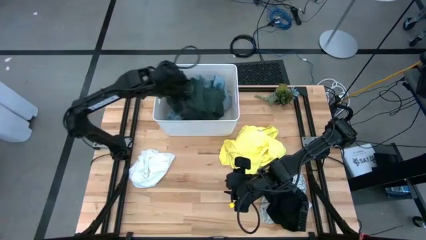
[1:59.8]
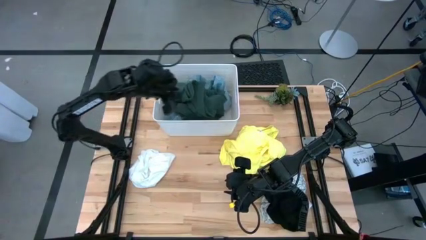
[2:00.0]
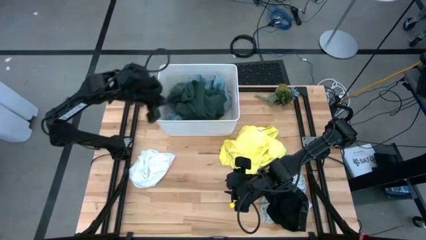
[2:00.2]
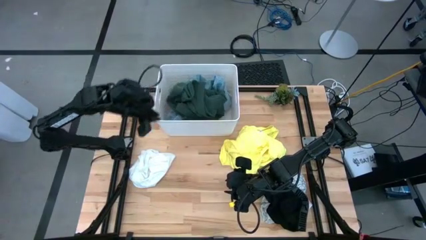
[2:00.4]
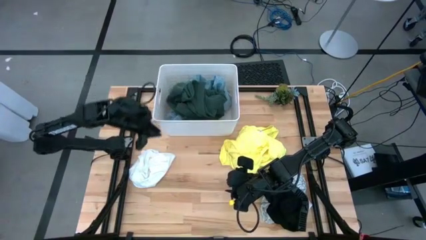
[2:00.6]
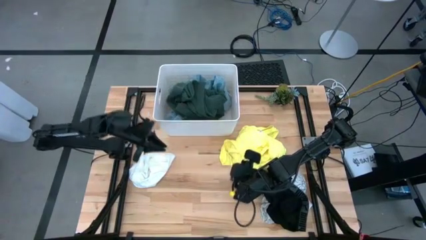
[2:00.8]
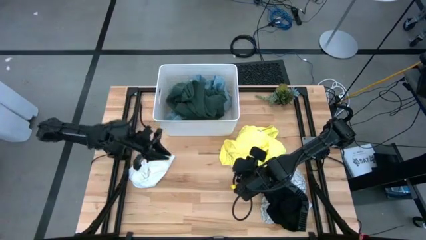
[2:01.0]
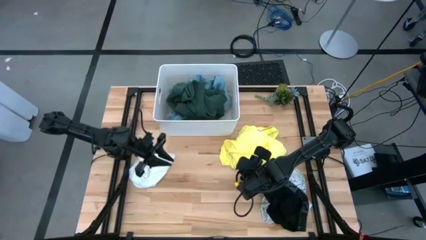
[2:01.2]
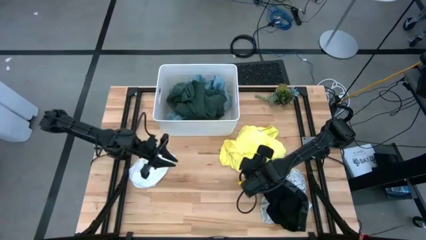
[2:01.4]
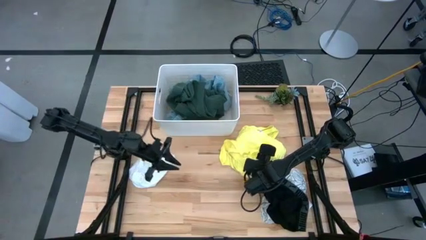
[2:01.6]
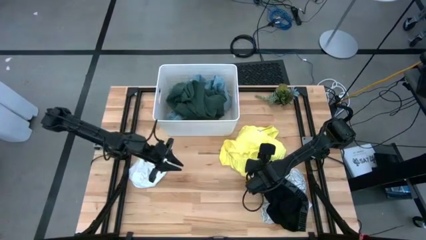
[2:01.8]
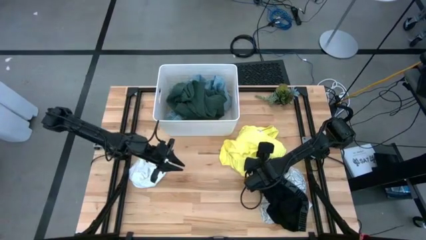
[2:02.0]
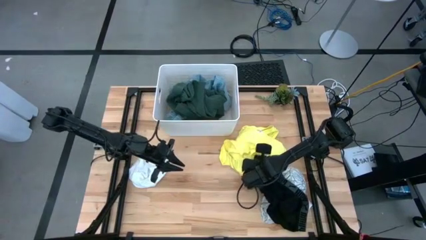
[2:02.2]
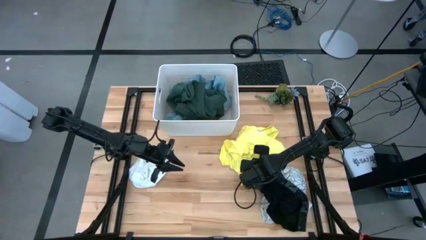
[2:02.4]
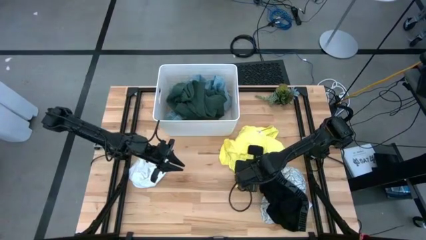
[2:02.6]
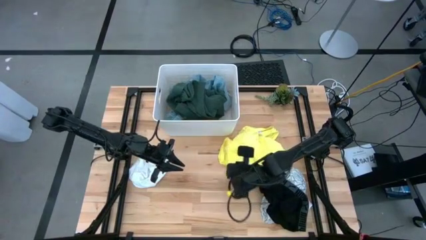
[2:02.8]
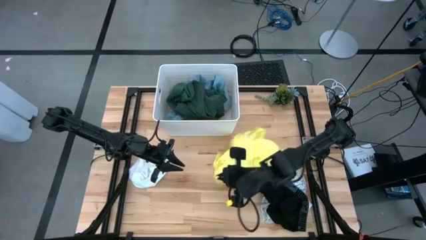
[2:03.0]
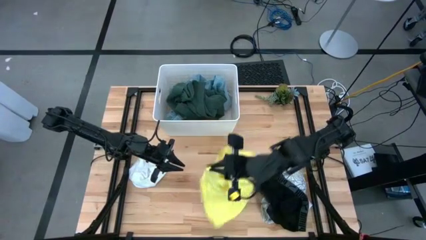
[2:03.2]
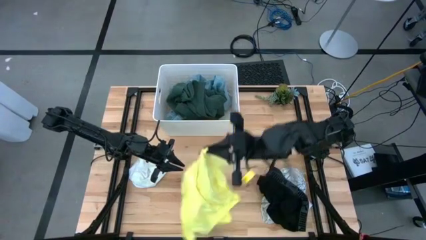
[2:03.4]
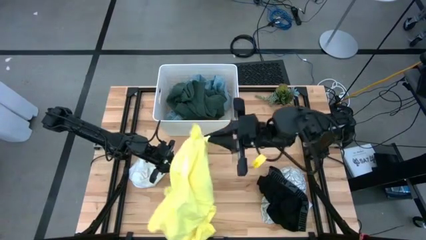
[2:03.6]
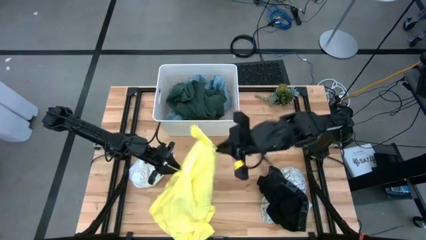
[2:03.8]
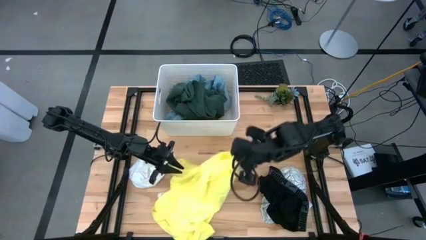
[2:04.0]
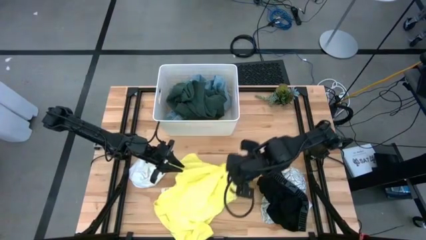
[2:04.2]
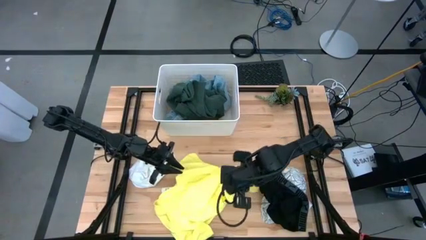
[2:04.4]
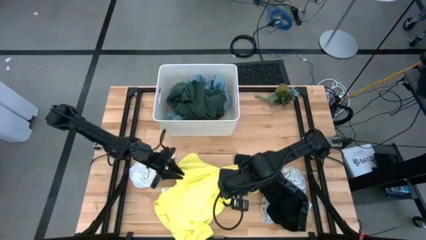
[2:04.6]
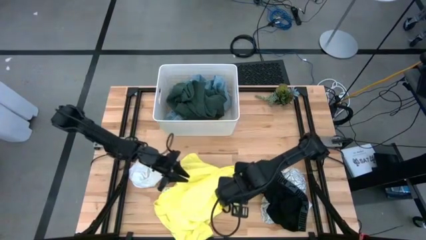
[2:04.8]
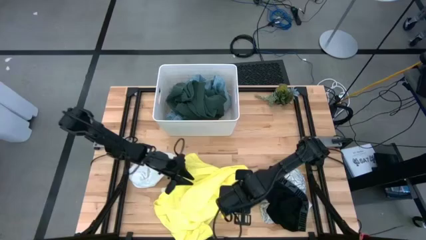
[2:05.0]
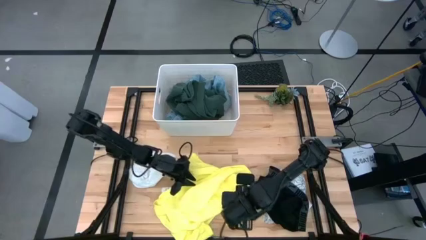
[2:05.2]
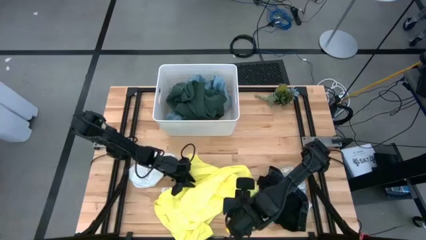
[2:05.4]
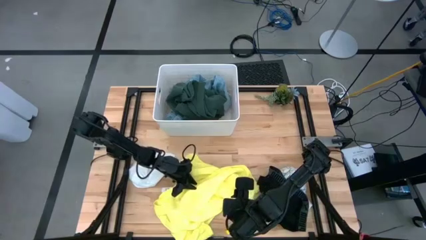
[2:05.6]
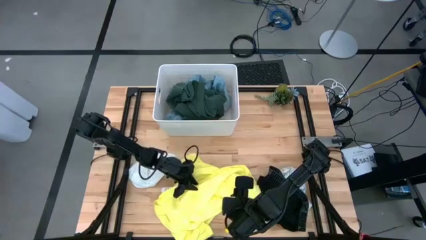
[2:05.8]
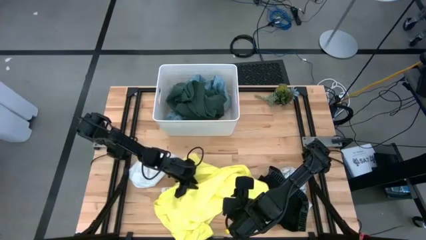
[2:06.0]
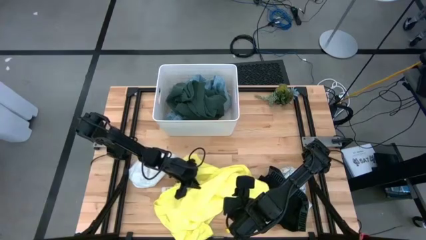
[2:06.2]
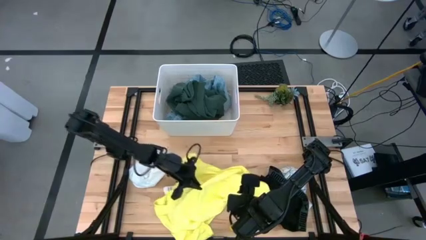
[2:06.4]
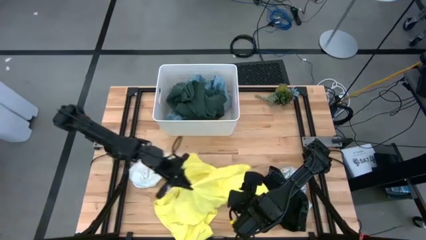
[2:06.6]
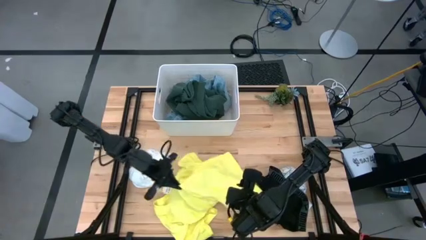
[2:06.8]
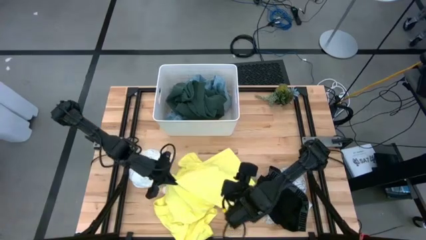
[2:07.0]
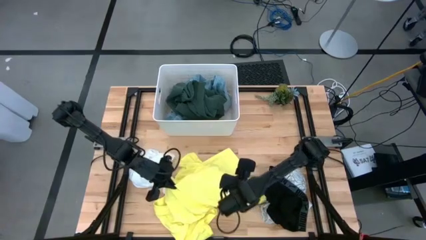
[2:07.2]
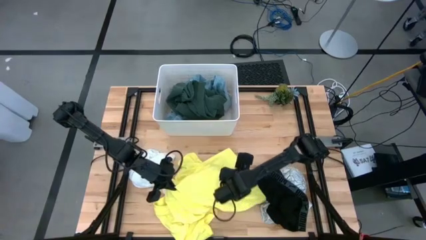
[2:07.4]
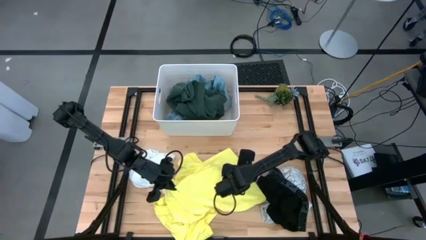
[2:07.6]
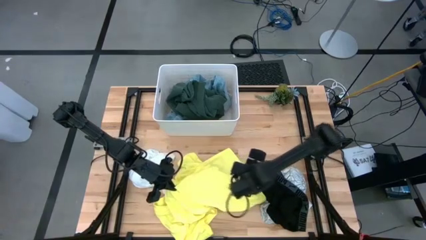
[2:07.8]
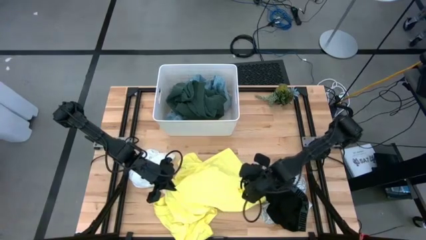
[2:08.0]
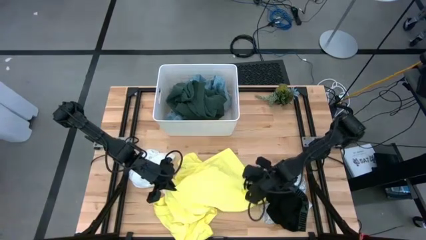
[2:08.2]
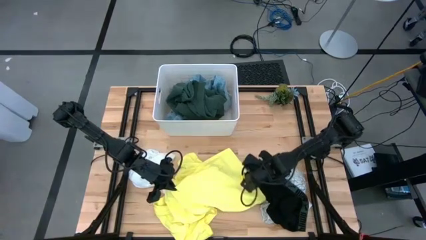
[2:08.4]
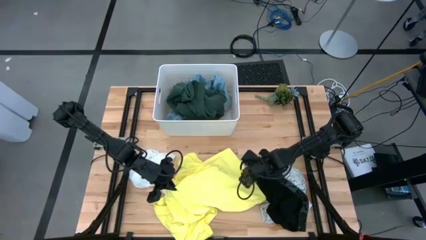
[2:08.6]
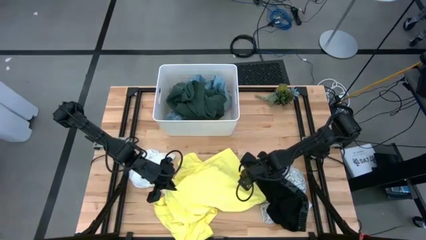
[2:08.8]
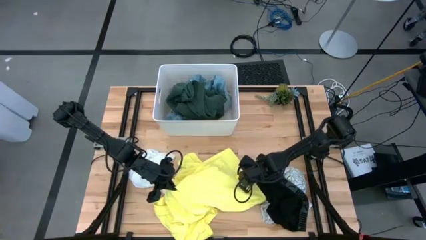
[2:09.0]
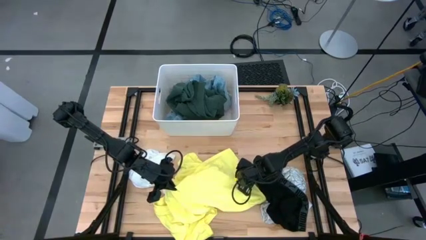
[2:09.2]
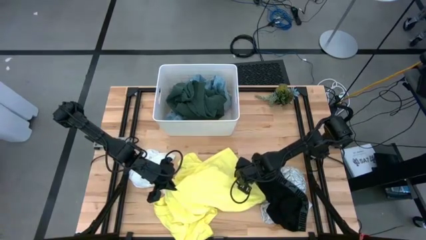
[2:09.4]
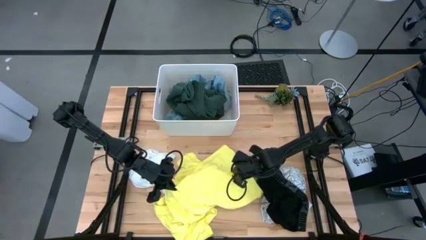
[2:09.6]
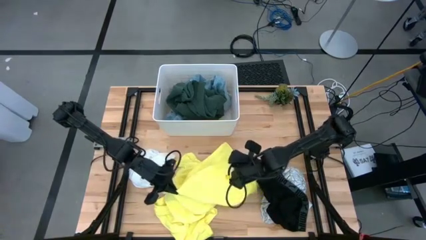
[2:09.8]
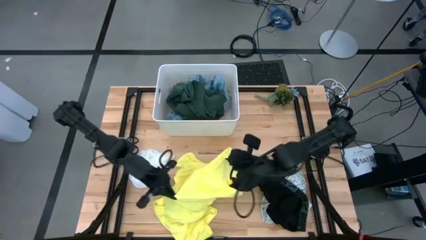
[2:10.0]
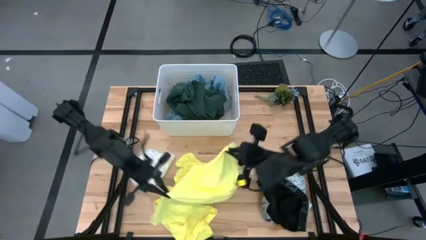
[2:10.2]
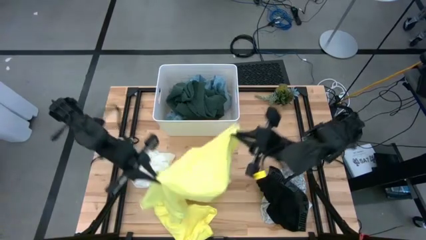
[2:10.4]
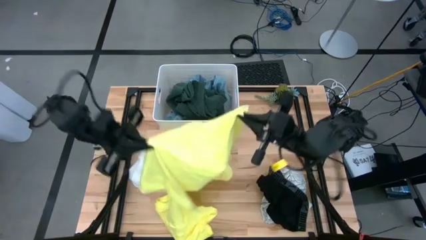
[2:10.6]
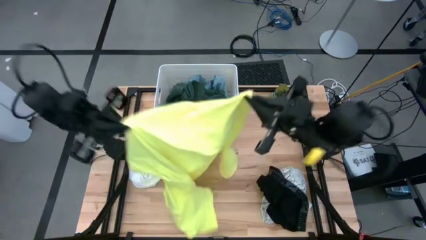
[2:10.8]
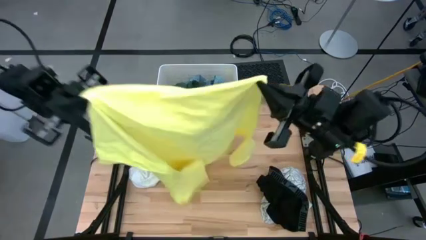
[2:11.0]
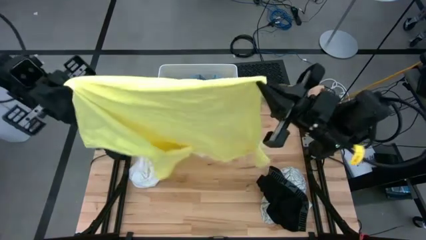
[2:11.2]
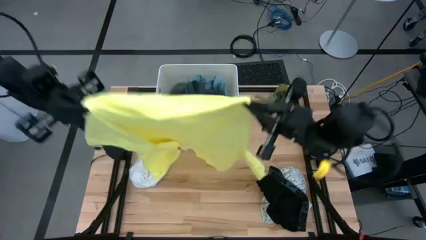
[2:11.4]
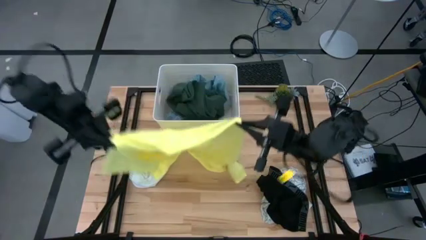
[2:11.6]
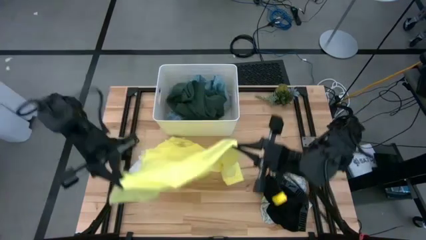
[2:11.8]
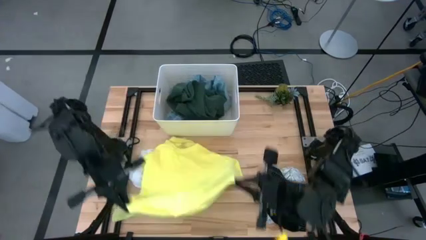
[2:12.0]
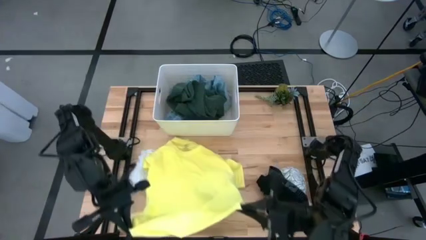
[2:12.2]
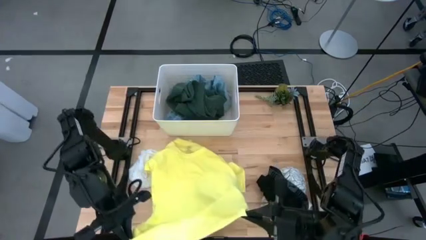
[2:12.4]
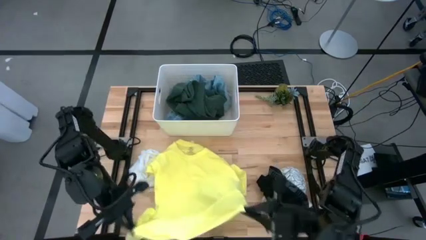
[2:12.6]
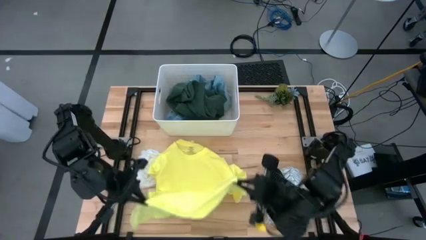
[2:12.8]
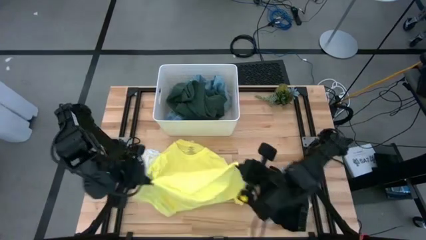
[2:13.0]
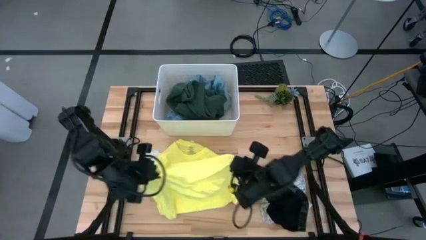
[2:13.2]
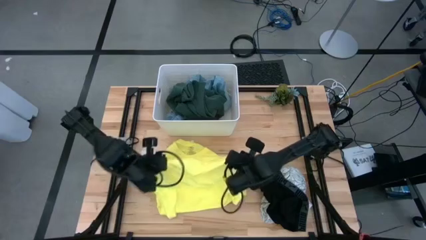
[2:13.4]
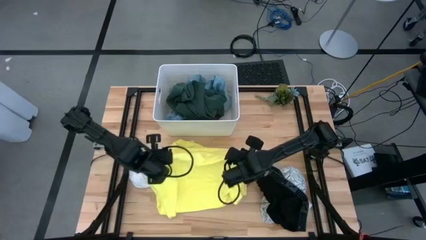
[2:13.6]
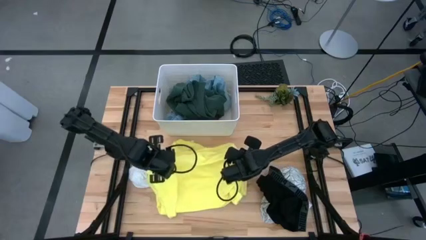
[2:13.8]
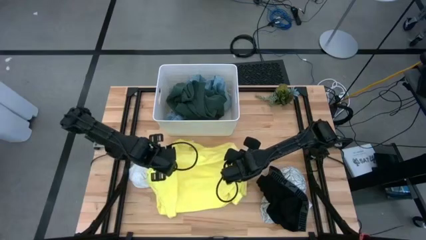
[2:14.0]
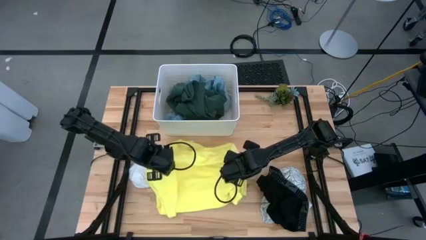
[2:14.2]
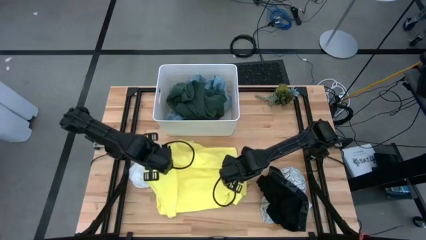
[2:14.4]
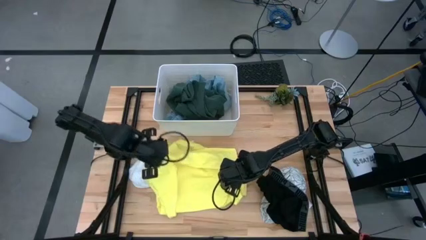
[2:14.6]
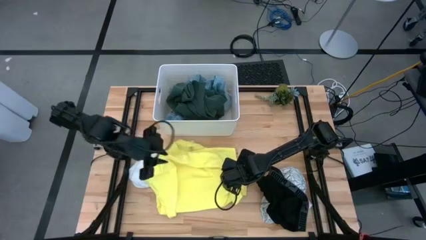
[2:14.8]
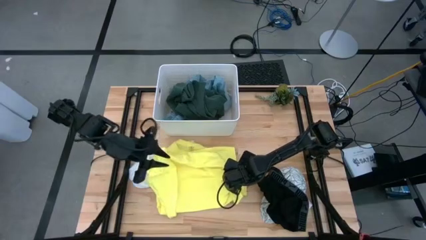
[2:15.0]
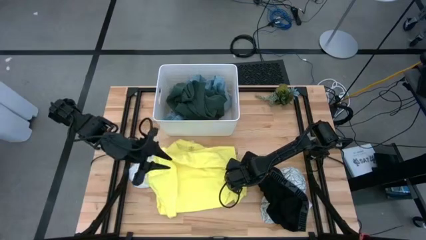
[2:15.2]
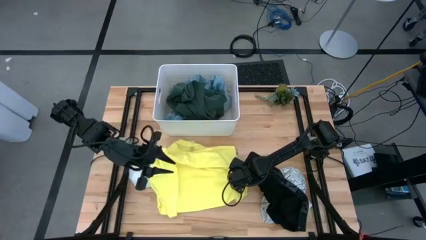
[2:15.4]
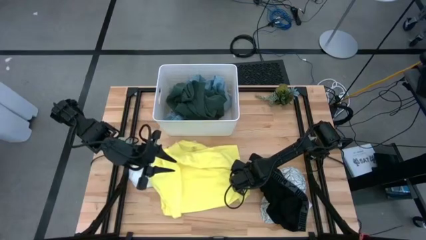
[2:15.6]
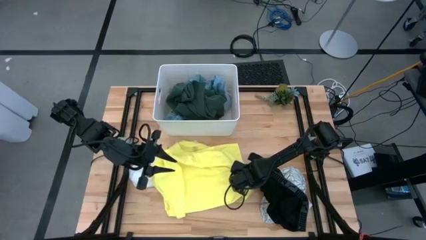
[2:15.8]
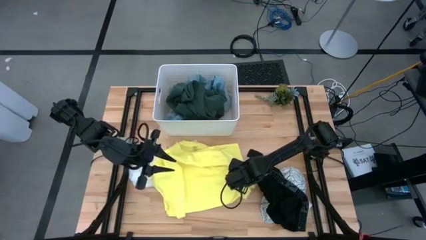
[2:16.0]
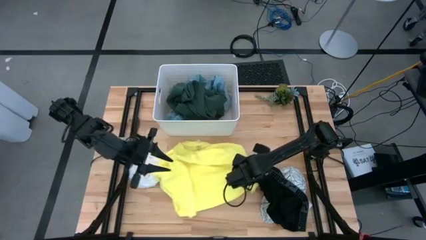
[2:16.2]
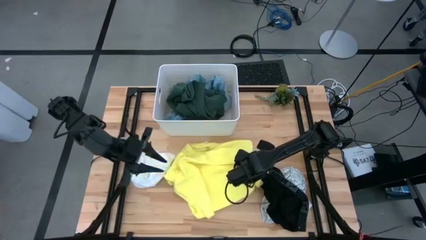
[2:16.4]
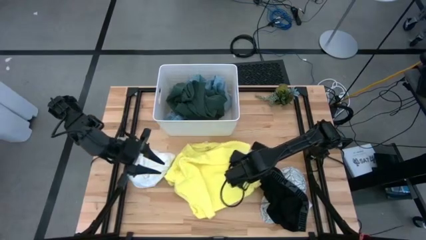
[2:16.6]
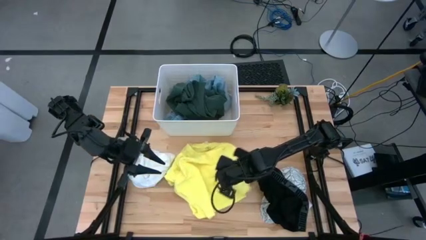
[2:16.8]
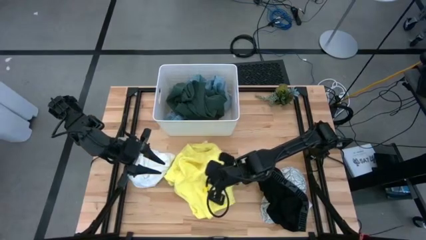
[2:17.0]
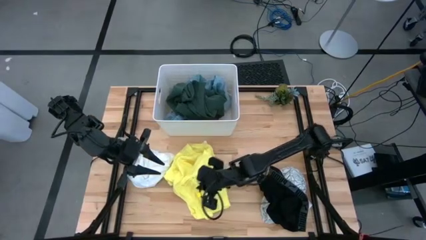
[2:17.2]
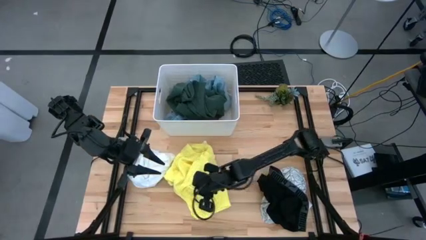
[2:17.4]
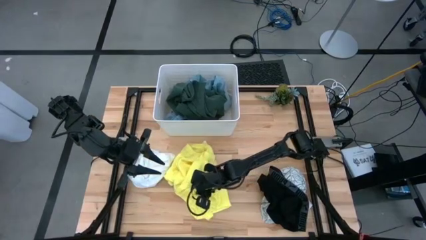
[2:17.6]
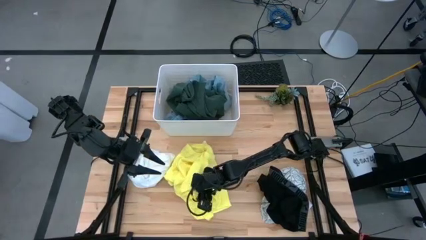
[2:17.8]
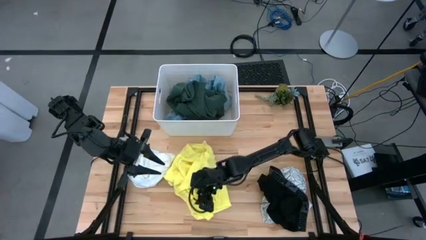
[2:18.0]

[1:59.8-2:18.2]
Task: Fold laundry
Fold the yellow shirt
